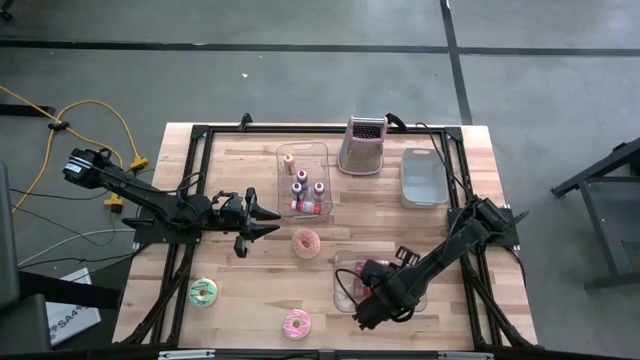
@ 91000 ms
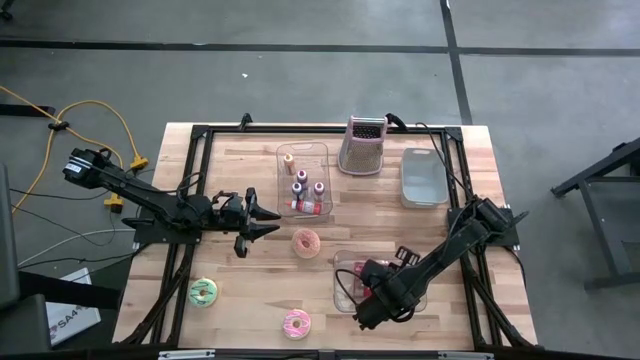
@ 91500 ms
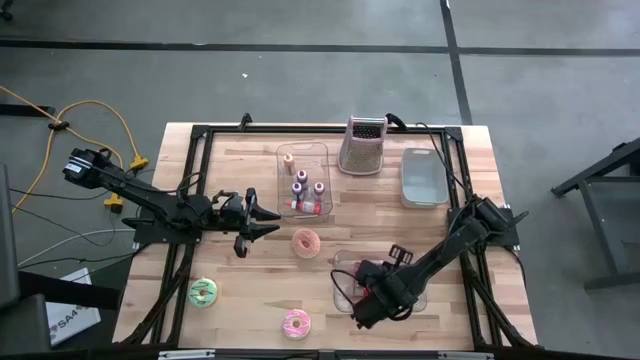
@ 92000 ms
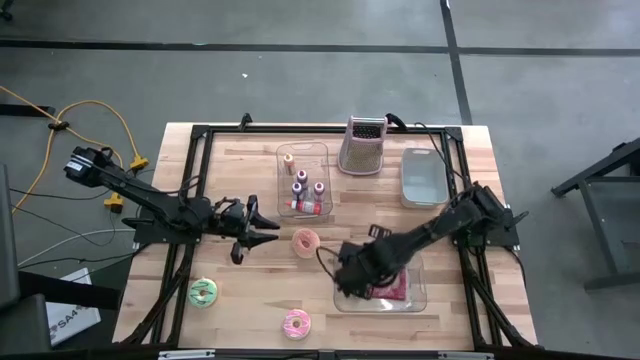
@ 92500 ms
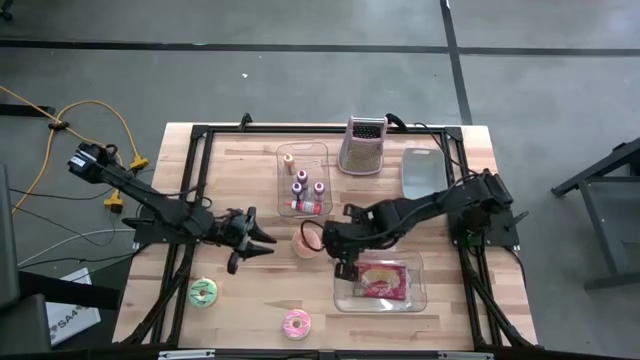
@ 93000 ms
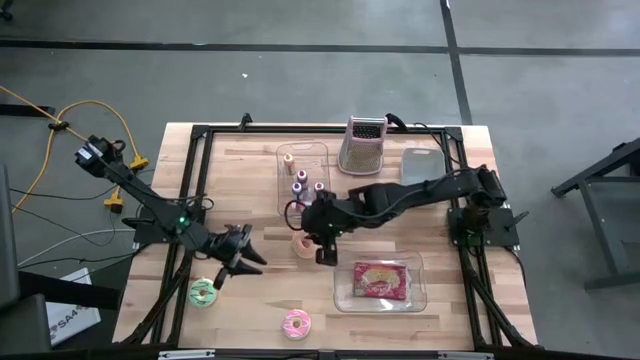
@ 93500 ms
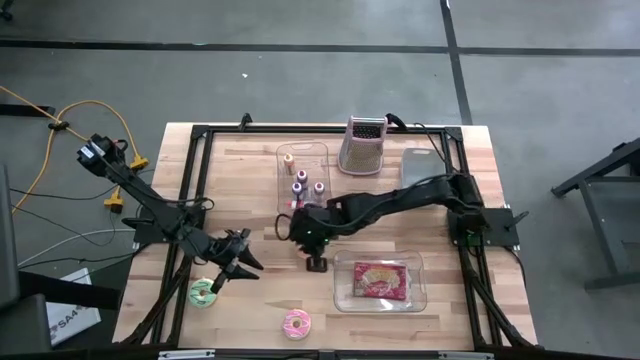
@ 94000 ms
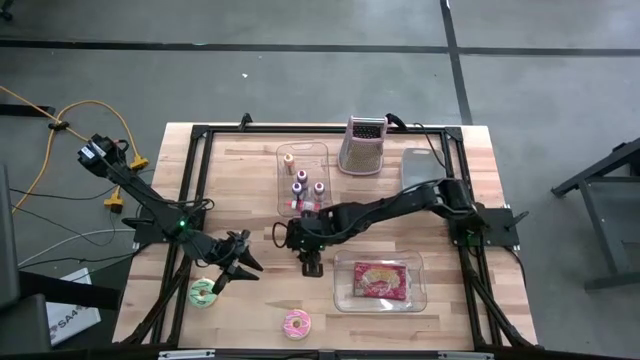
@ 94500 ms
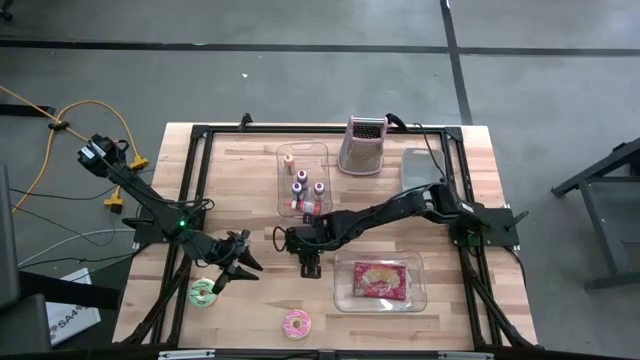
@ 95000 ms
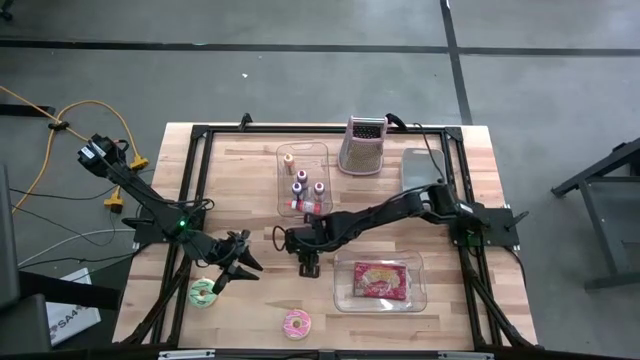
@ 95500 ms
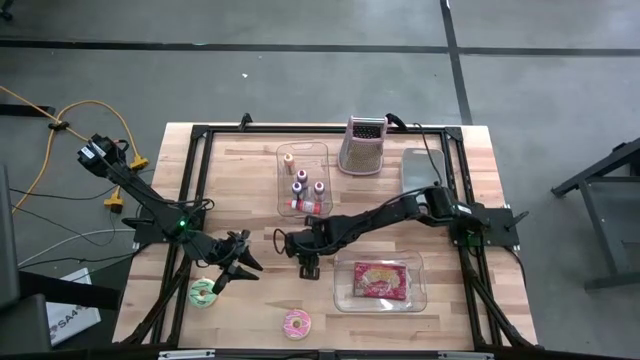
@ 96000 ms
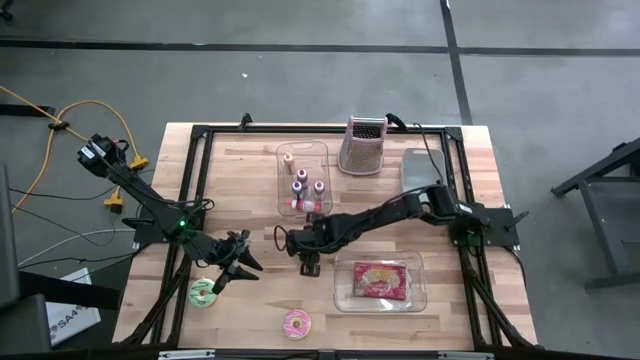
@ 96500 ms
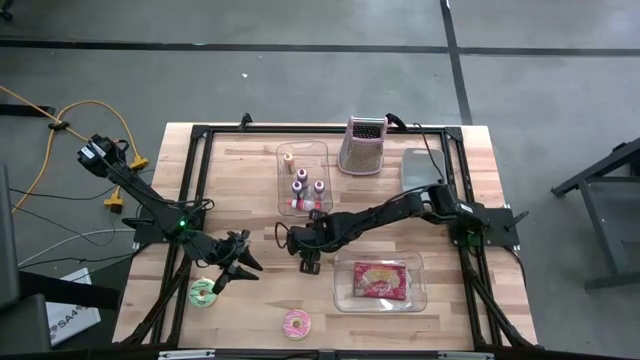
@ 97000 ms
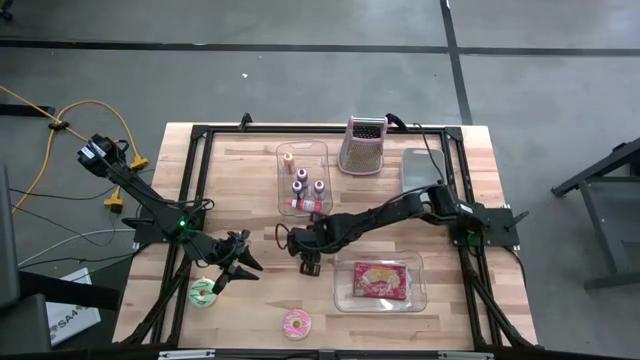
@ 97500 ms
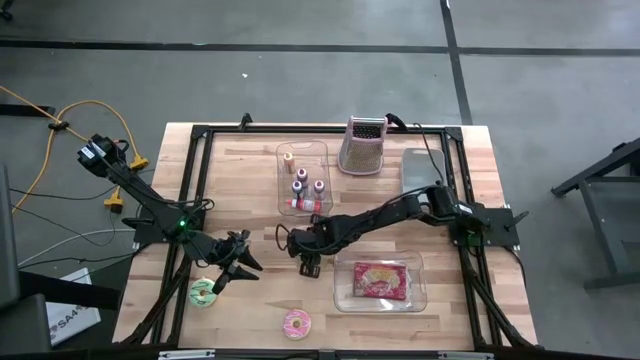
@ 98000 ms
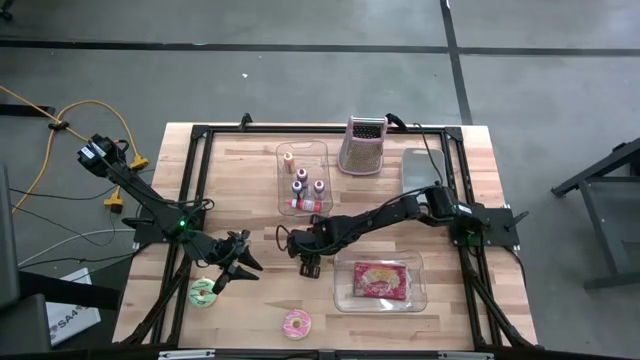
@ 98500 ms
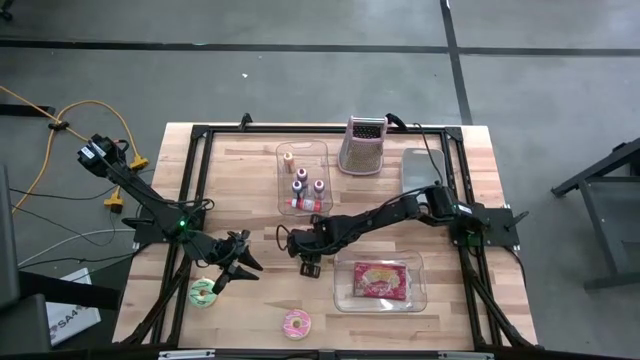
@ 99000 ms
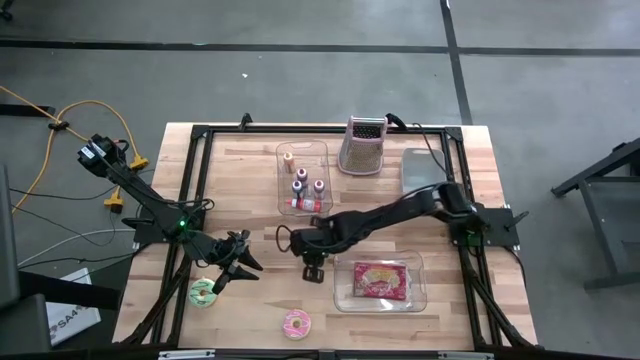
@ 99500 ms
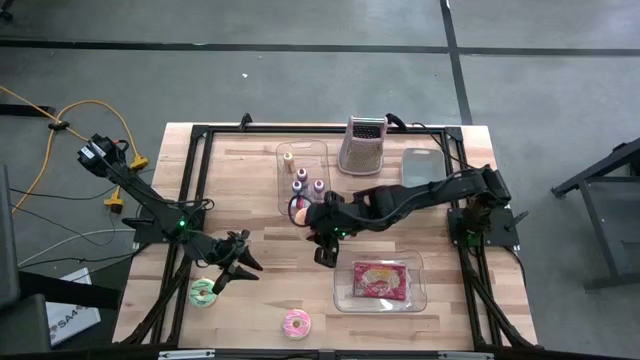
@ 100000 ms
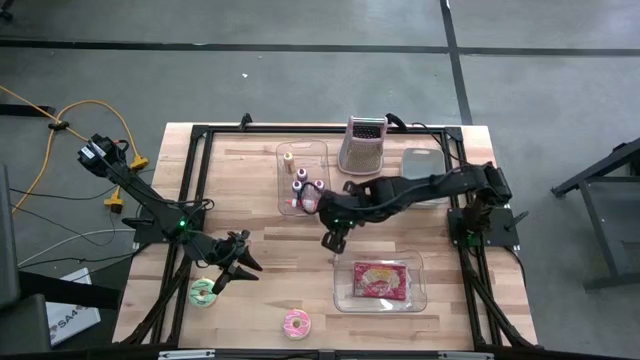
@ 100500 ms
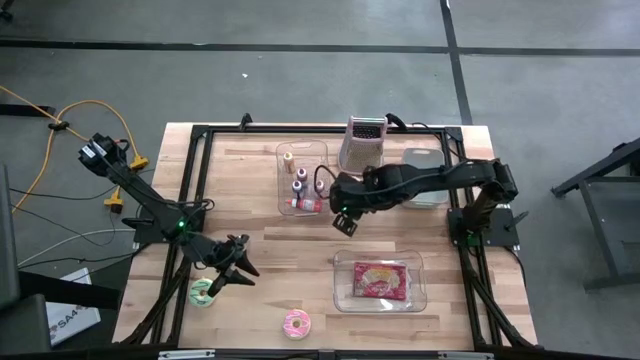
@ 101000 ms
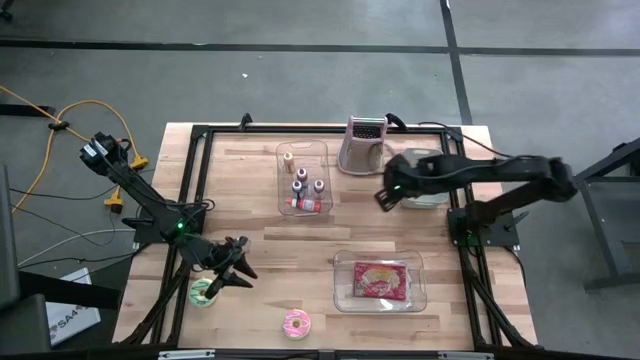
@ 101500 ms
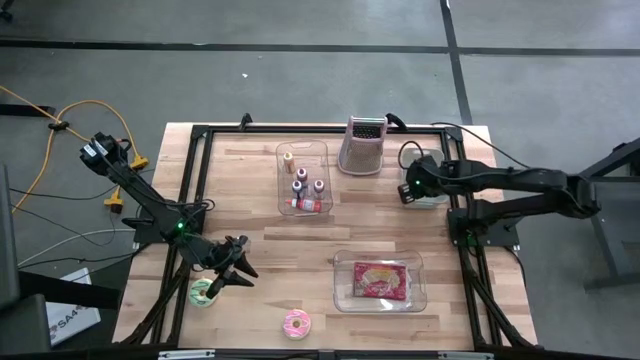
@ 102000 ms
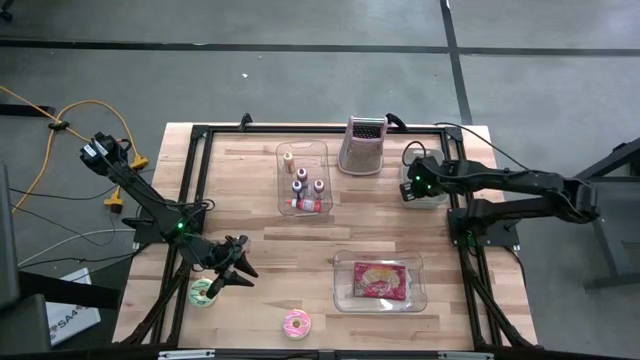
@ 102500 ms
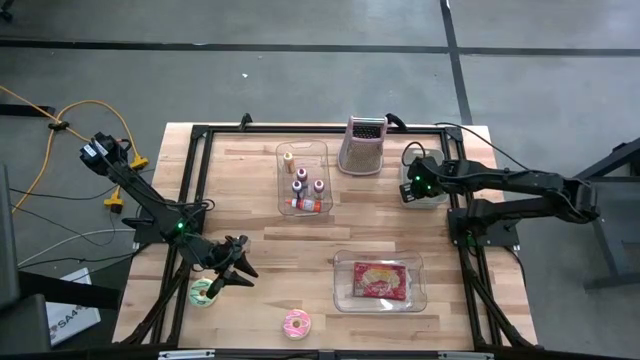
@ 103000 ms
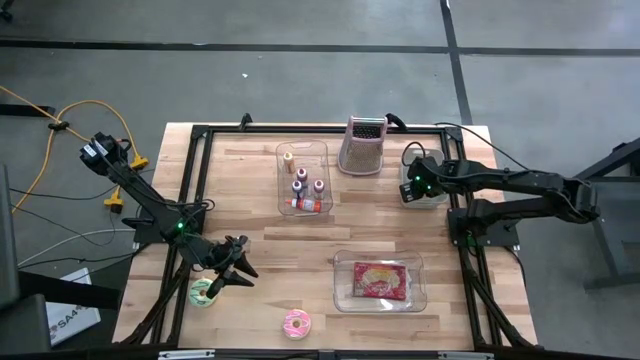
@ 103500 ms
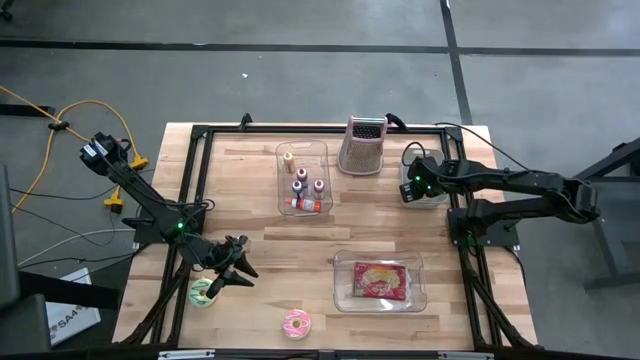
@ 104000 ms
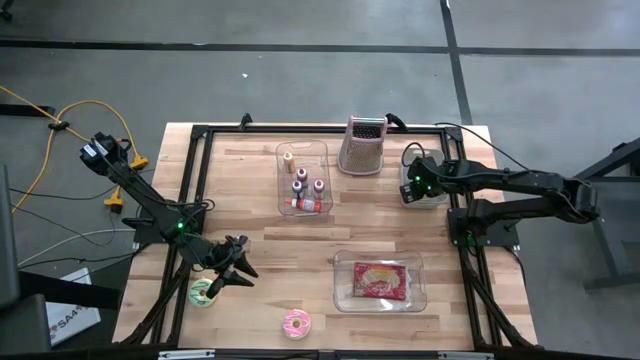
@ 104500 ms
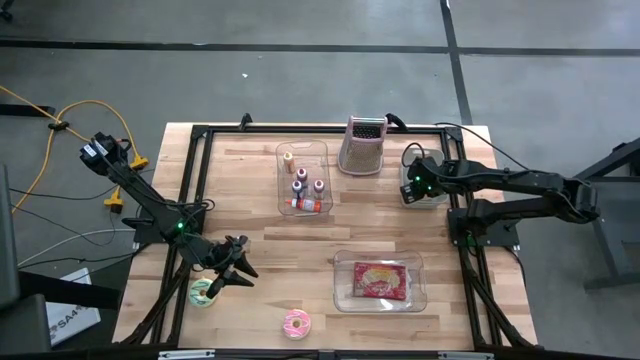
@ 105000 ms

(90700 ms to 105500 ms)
Put the orange donut into the gray bin
